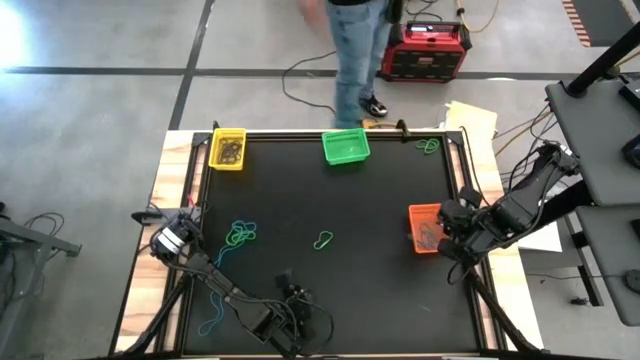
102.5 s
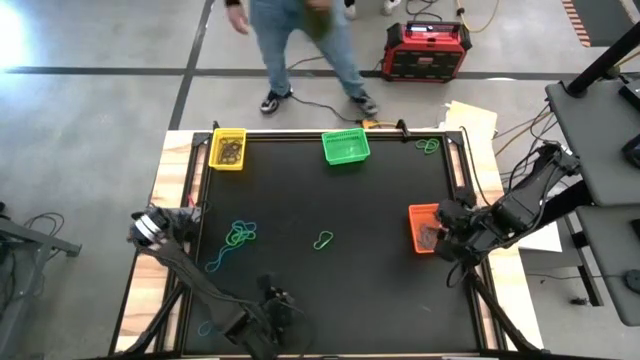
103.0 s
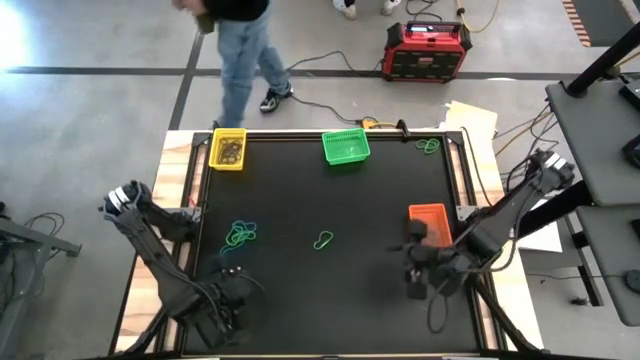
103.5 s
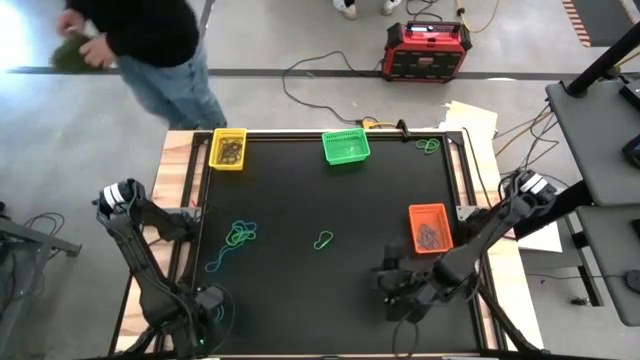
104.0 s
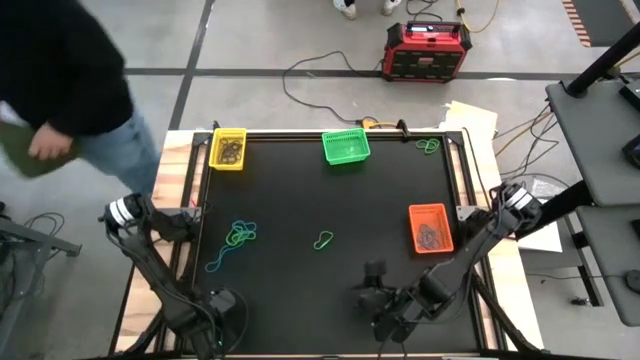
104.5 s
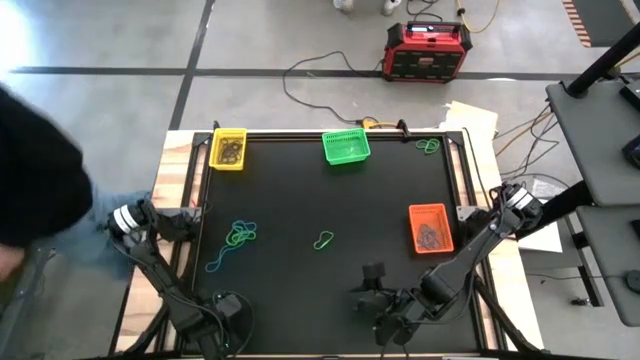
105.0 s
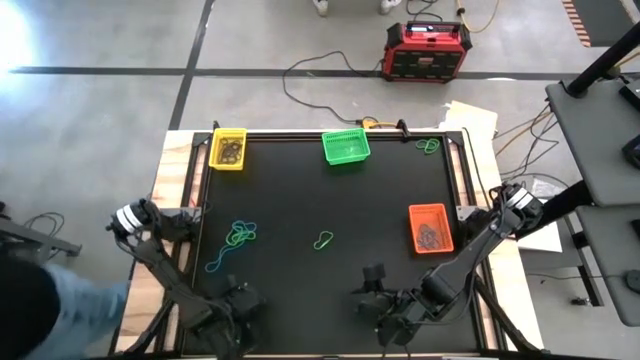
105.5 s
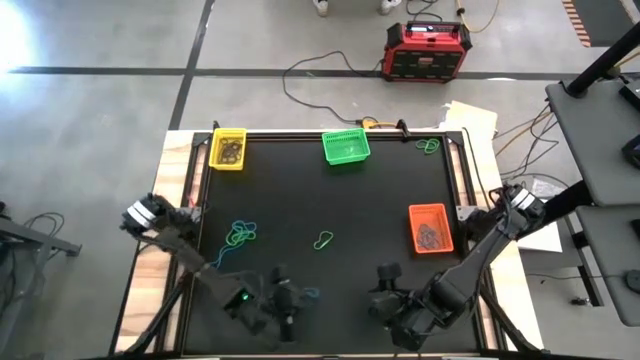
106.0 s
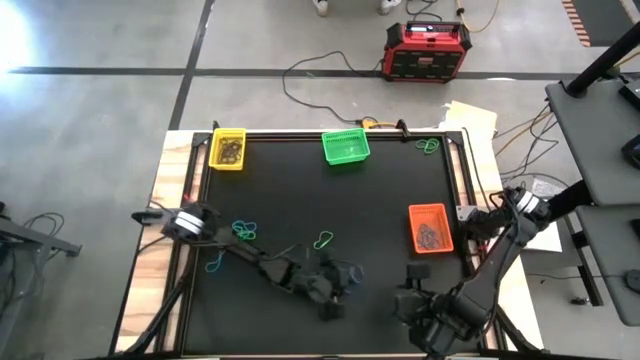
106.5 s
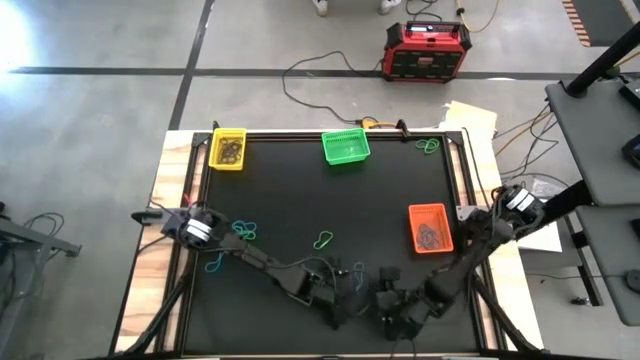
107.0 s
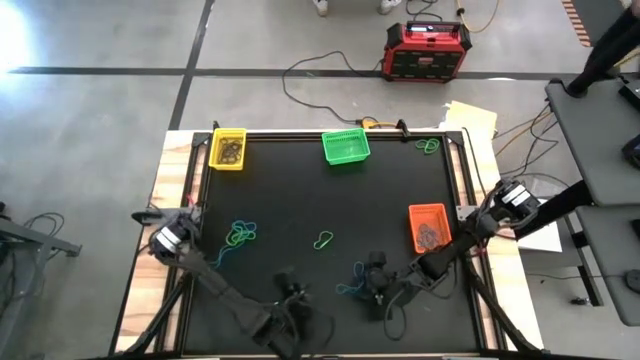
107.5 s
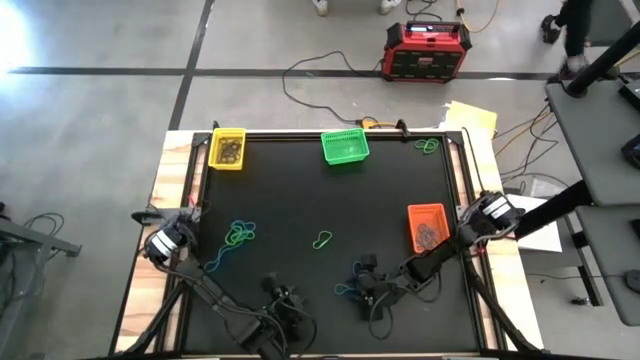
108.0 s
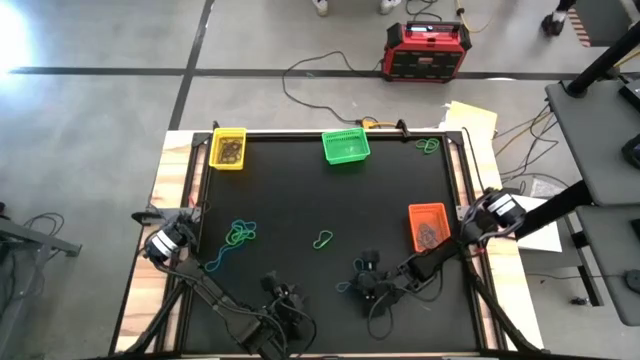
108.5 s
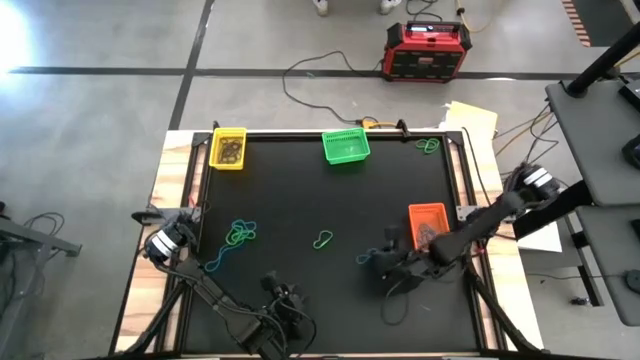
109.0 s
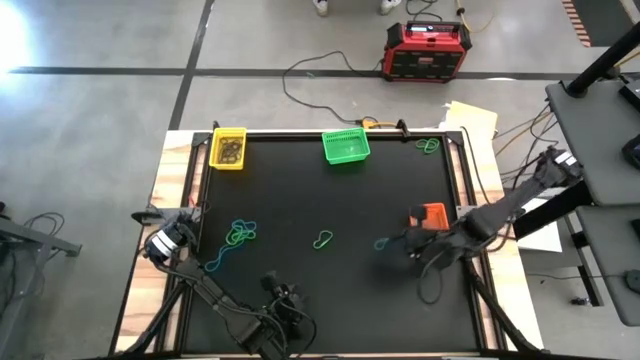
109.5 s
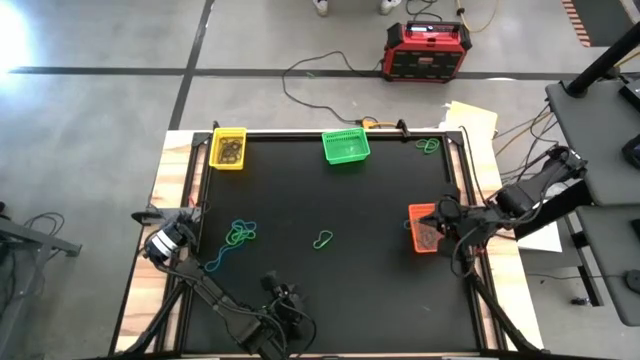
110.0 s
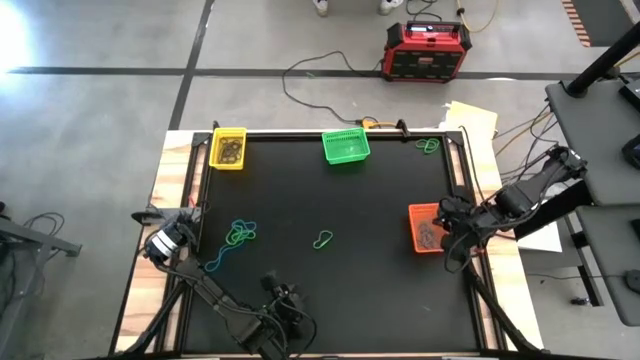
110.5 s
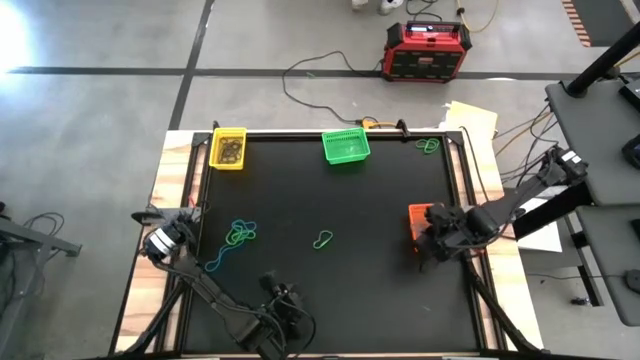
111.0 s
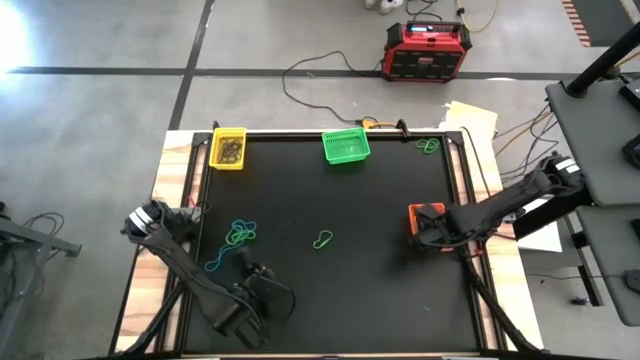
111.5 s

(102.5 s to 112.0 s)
Task: Sort rubber bands into baskets
Put the blue rubber band into the orange bin

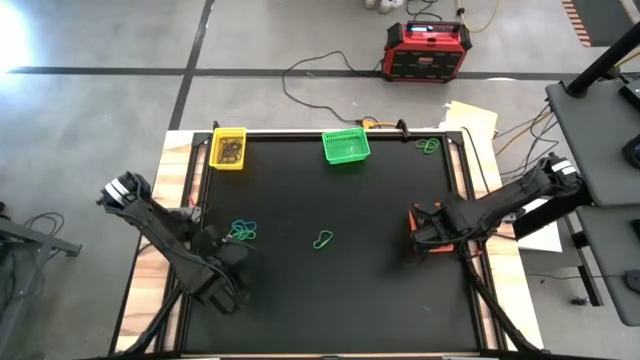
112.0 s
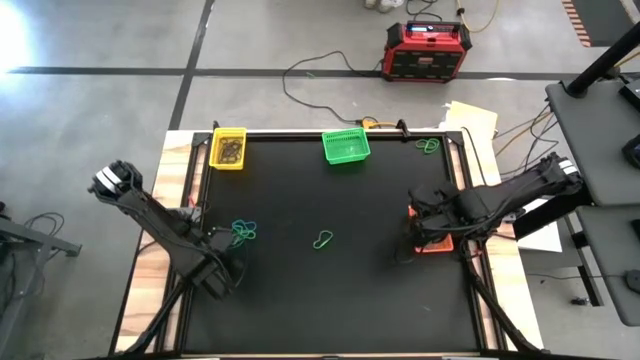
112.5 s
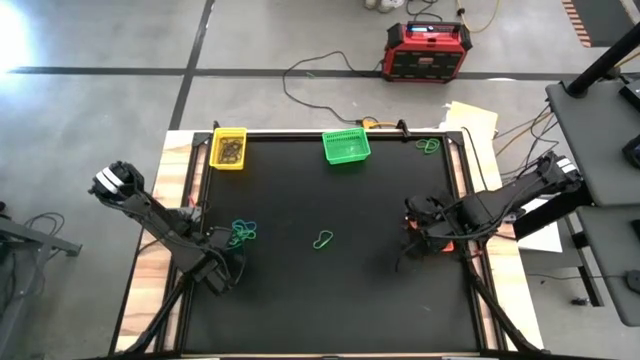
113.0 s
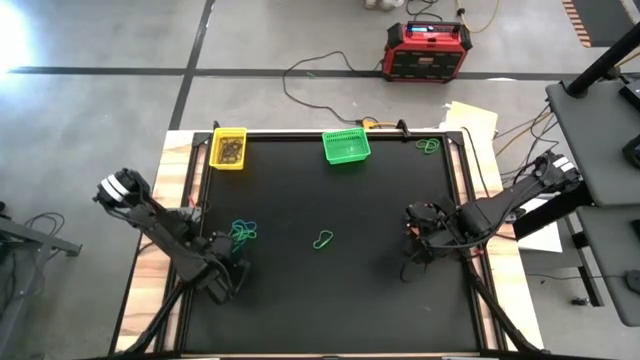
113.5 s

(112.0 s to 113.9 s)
Put the blue rubber band into the orange bin

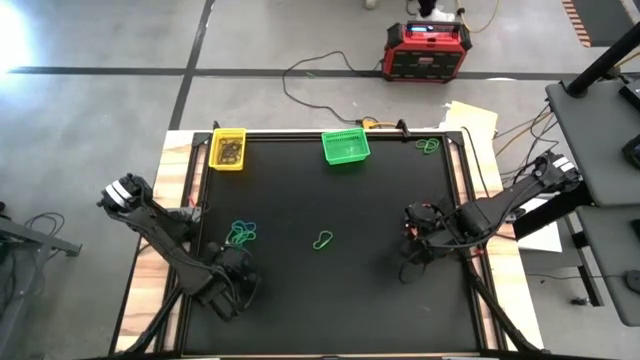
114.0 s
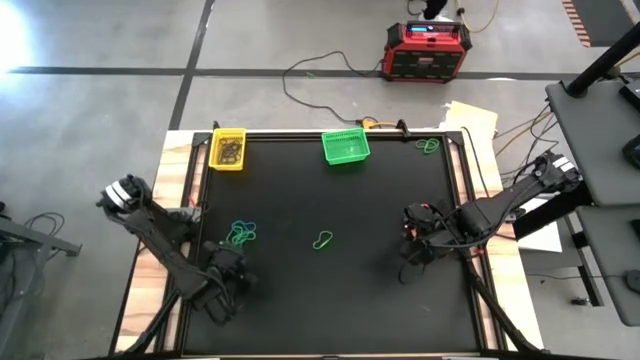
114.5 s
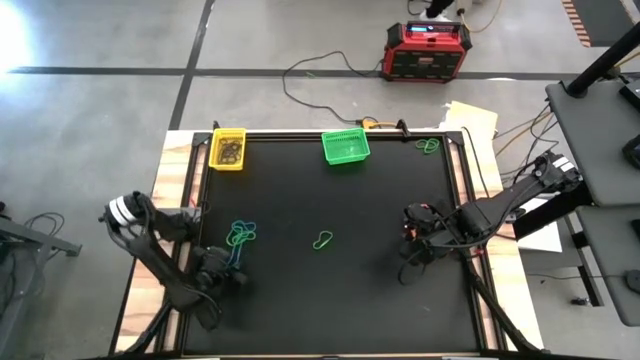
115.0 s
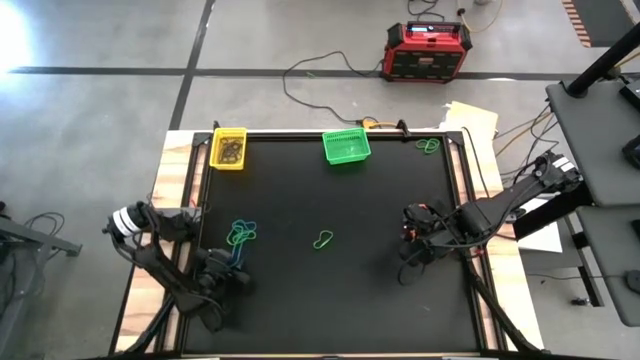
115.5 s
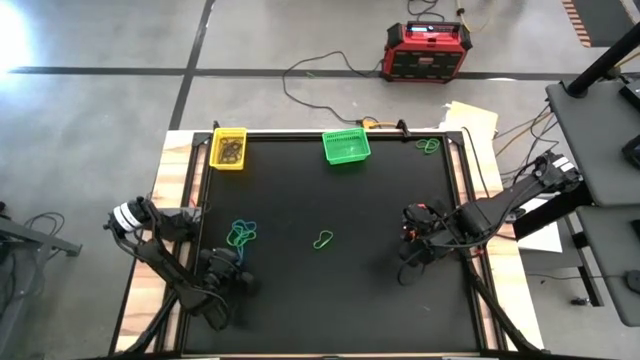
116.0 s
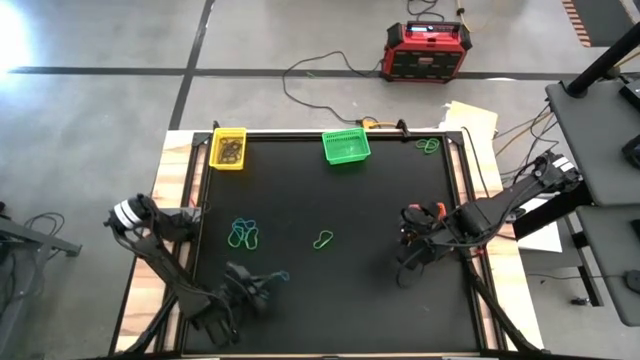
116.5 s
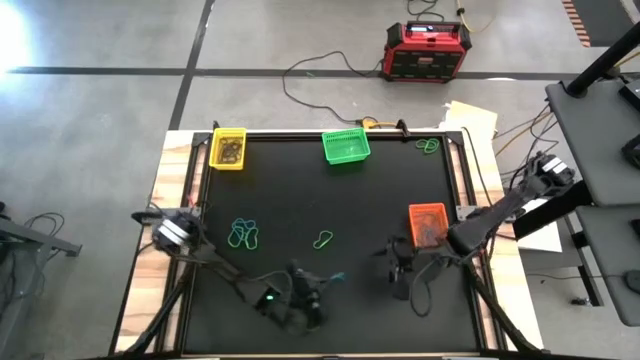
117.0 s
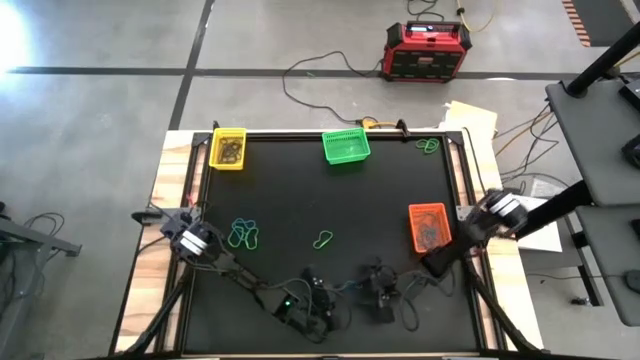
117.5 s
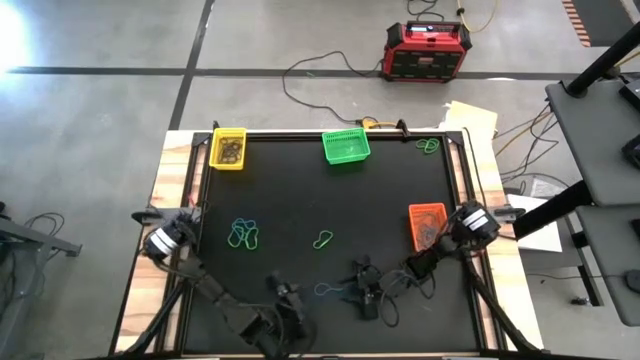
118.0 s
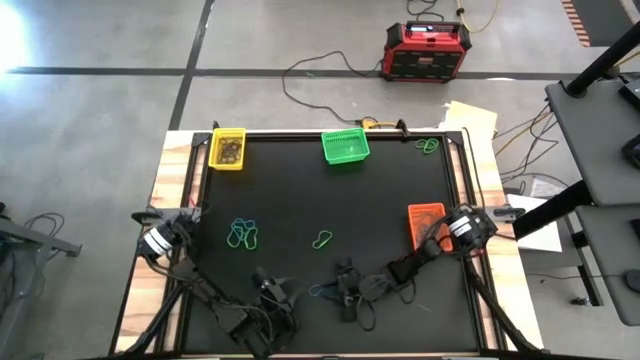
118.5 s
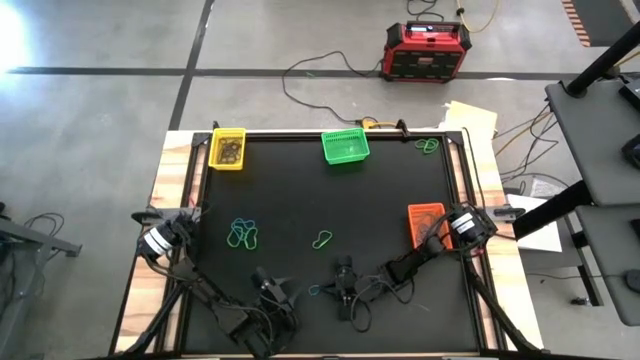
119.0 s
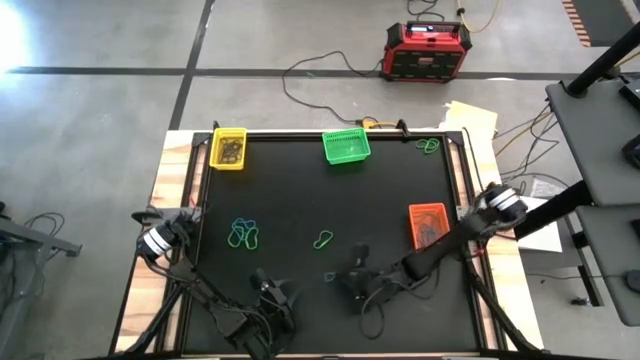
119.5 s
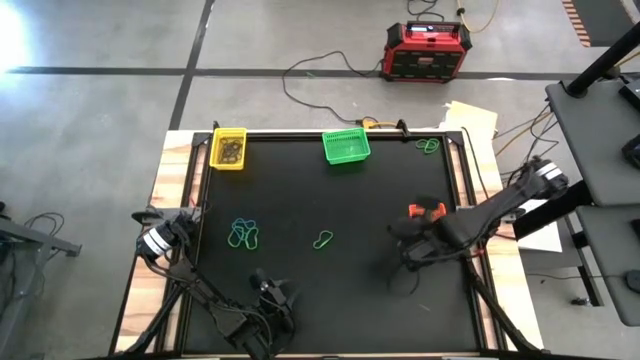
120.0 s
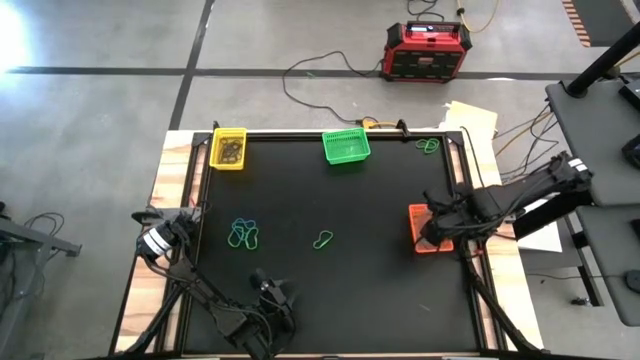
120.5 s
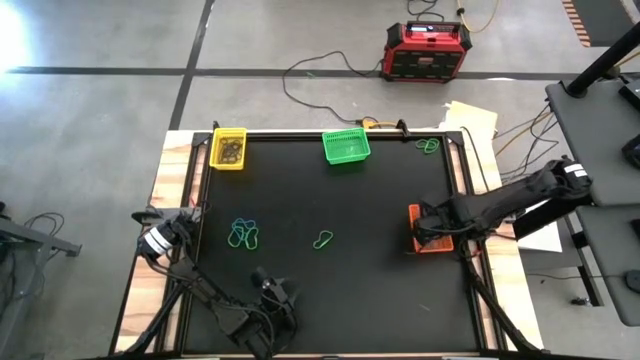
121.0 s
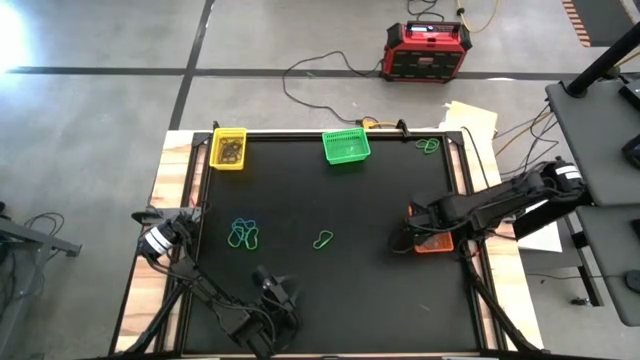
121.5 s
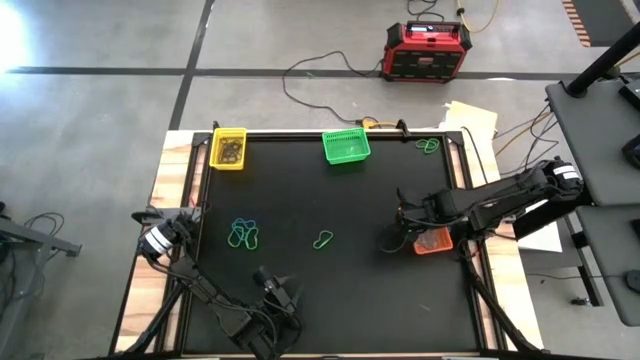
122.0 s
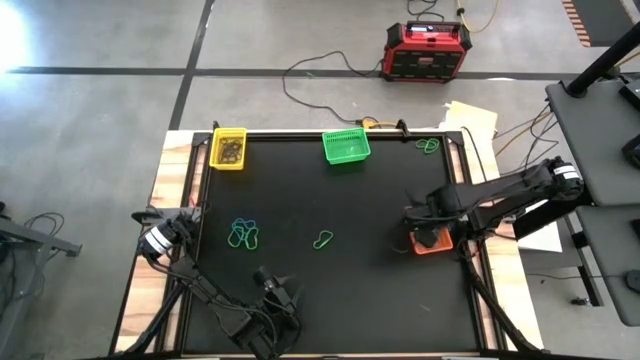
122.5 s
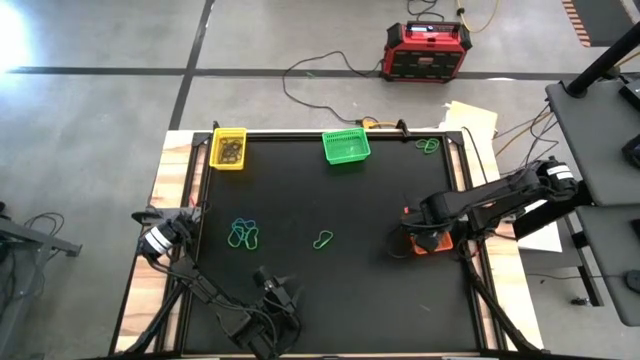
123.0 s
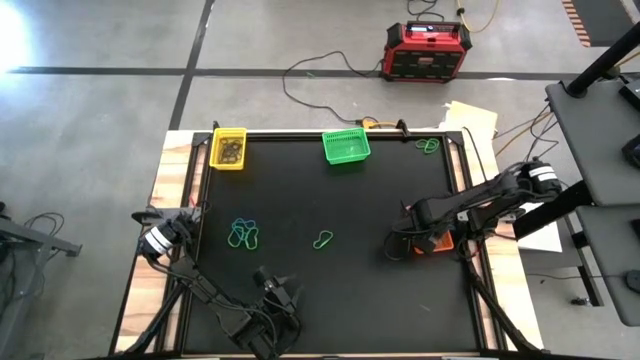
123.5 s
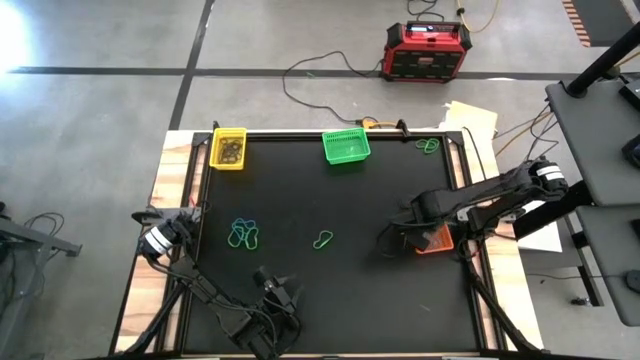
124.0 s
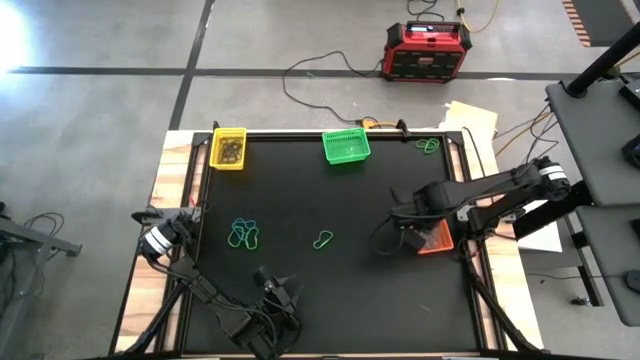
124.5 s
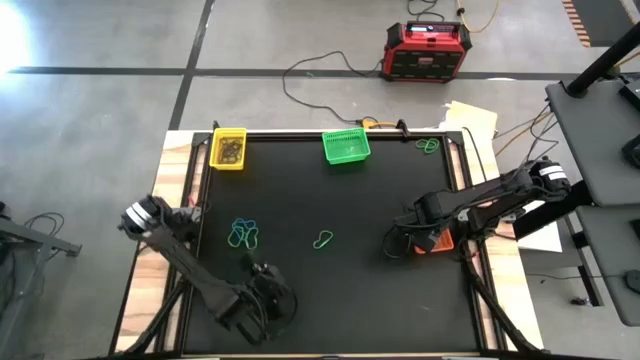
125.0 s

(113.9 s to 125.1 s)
Put the blue rubber band into the orange bin
